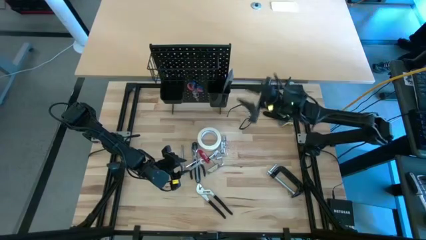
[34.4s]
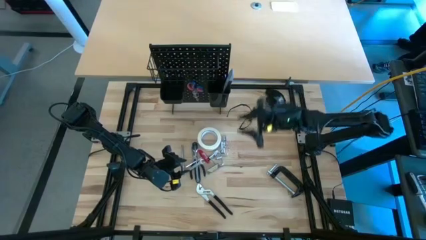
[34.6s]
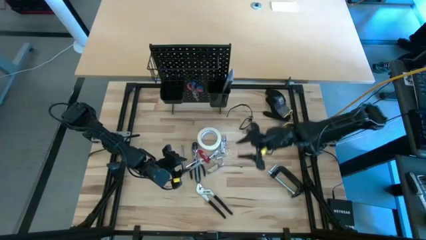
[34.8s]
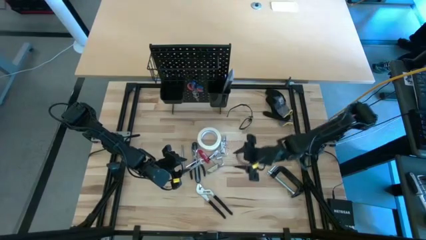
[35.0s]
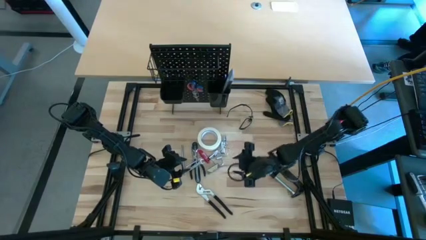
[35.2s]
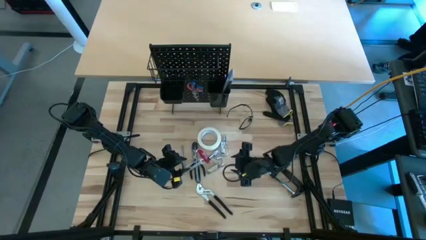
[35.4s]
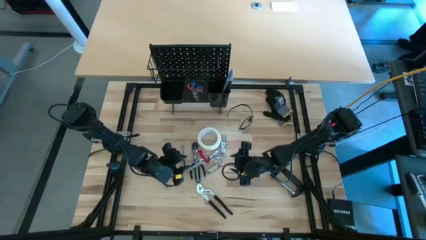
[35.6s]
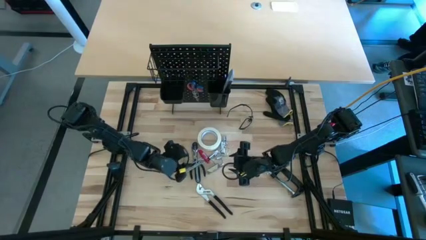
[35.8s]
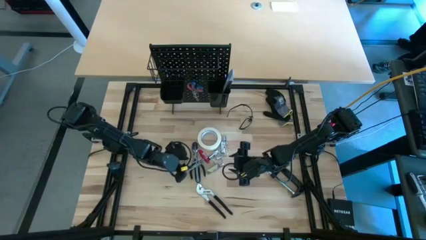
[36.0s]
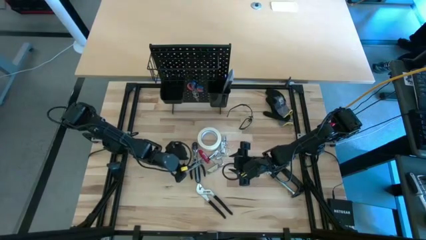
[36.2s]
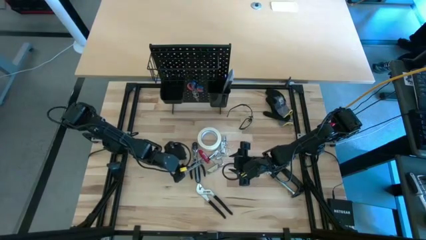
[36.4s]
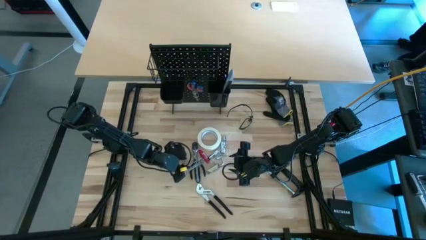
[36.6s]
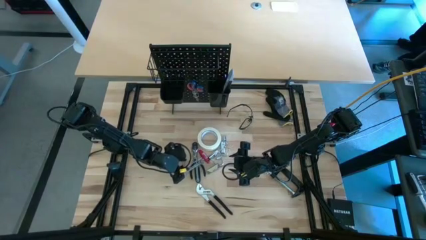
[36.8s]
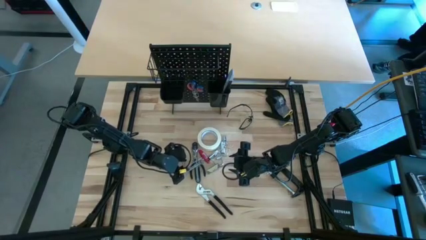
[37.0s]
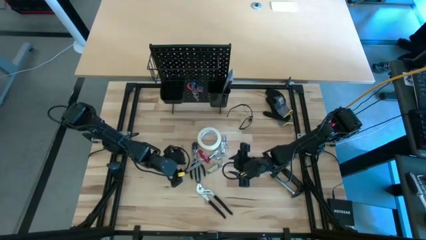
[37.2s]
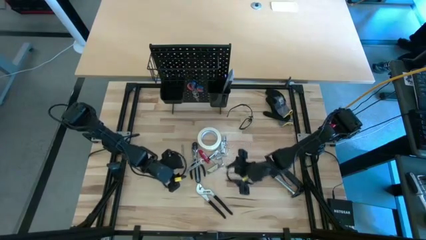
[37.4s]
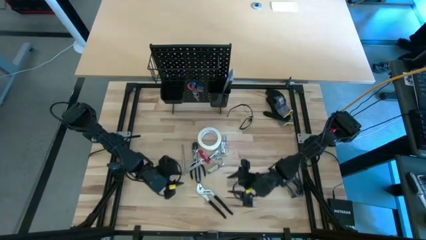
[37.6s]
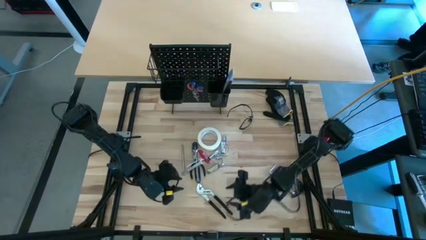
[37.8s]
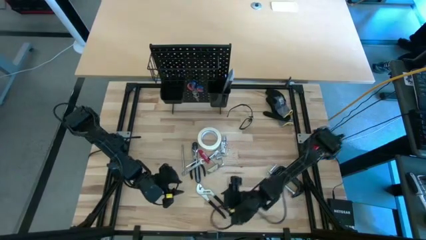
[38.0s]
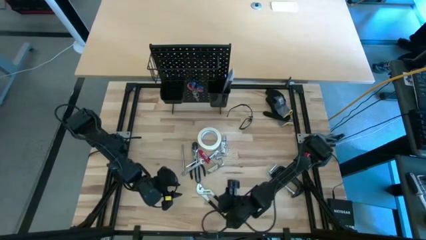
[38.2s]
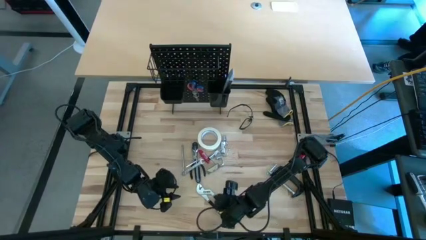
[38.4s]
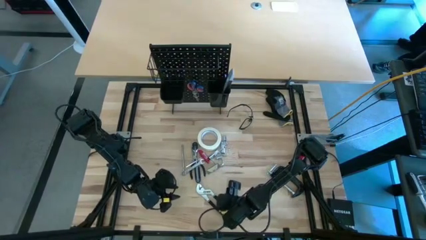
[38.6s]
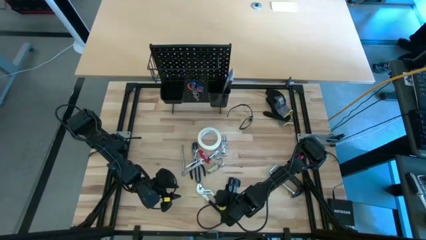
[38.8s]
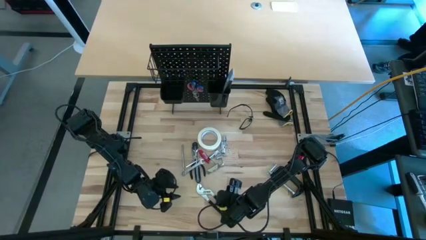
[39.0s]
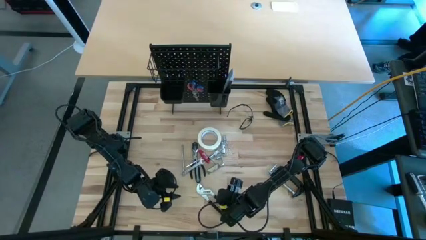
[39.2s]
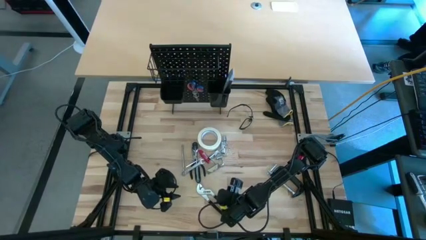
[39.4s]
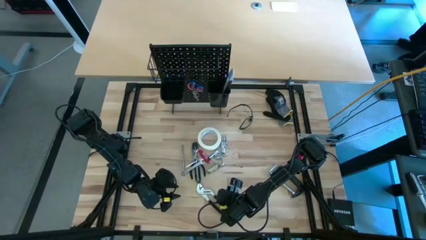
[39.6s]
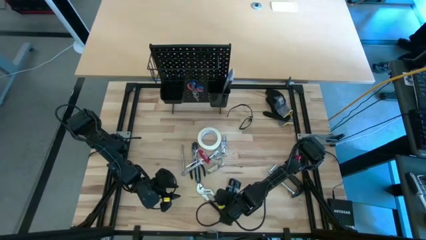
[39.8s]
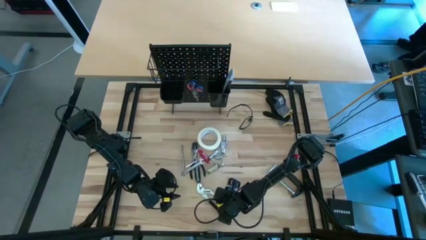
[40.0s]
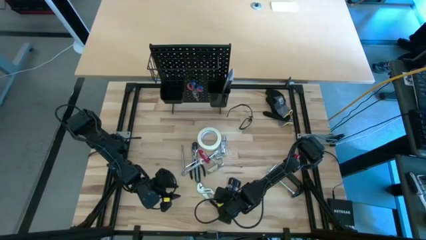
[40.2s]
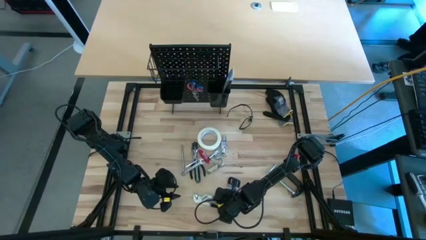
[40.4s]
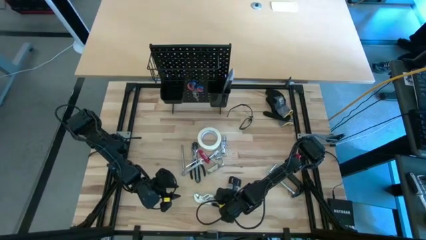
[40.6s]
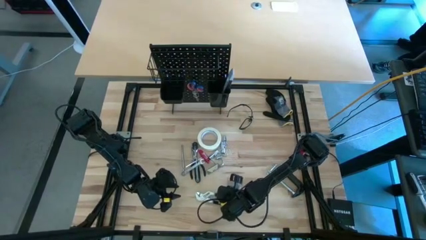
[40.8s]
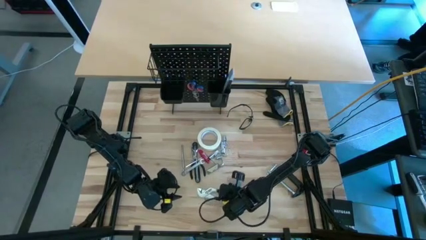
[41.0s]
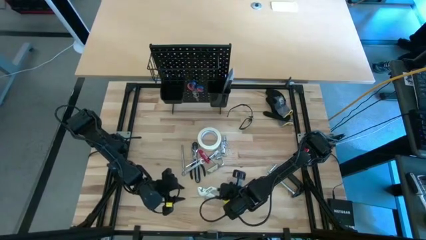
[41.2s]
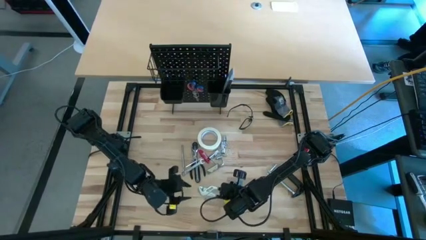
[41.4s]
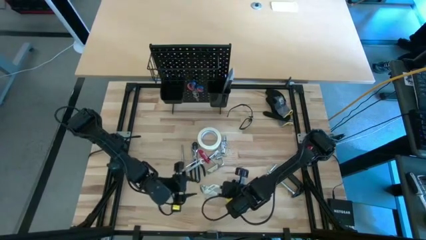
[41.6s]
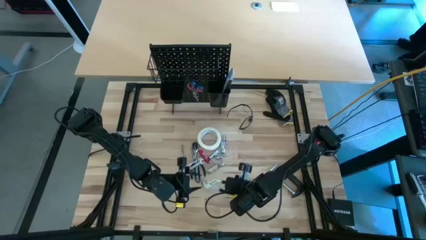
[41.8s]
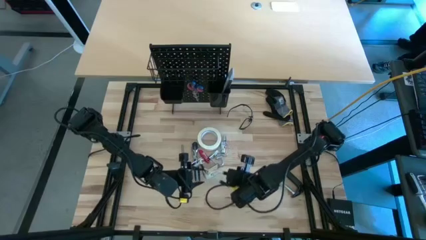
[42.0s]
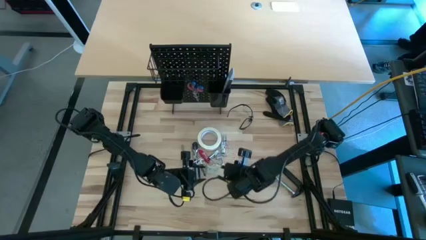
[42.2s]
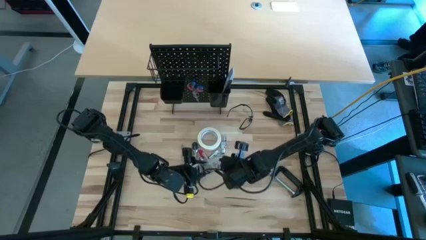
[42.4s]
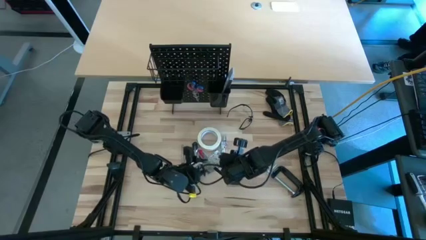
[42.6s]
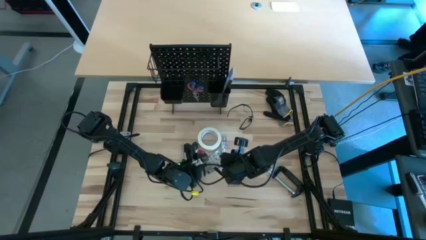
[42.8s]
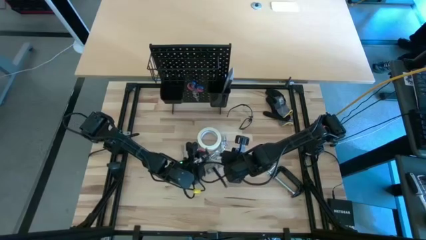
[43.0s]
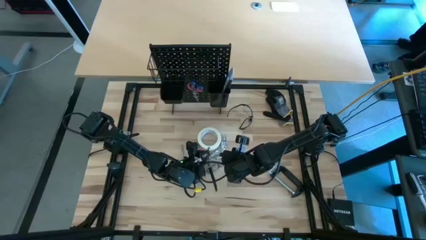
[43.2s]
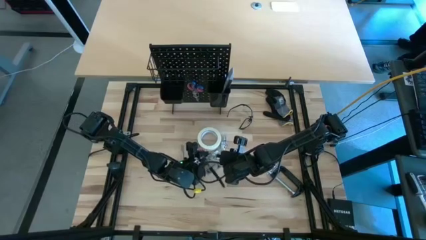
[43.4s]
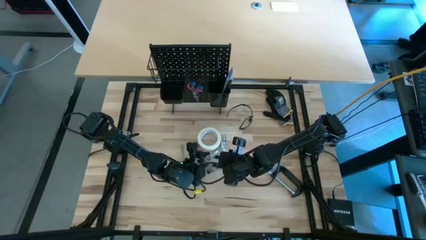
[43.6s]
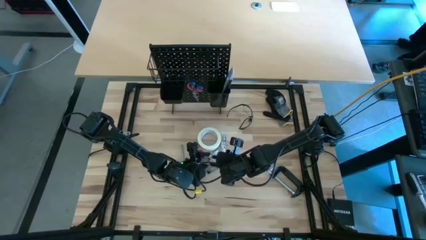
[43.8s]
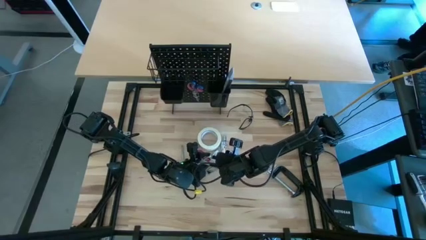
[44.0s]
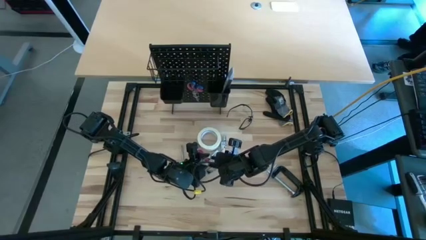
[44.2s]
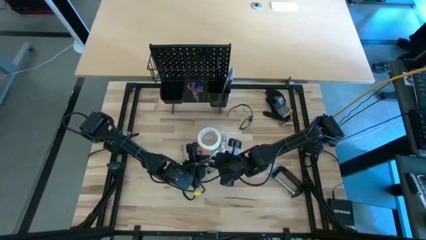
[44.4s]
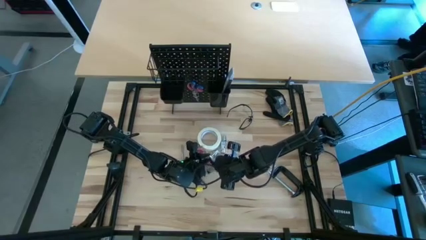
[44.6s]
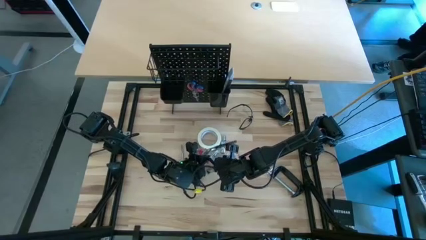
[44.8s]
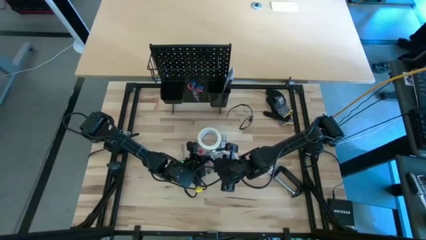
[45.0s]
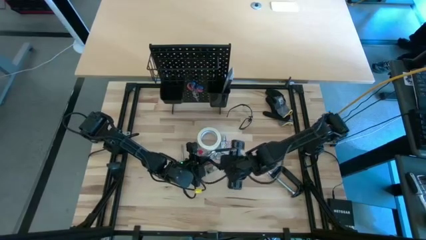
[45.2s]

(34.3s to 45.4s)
Task: Hang tools onto peg board
Put the black slip-joint pliers into the right black bin on the peg board

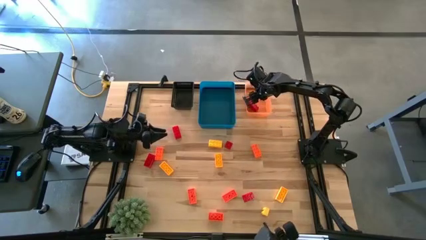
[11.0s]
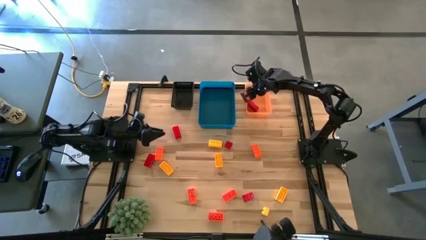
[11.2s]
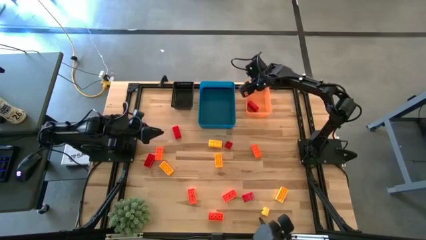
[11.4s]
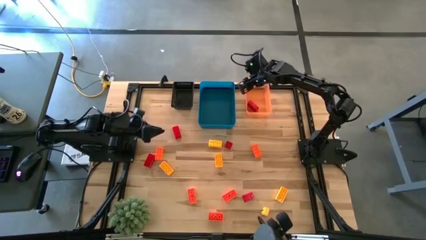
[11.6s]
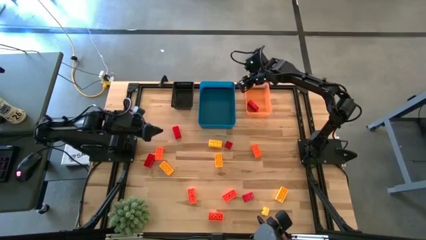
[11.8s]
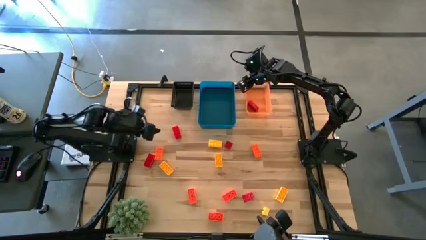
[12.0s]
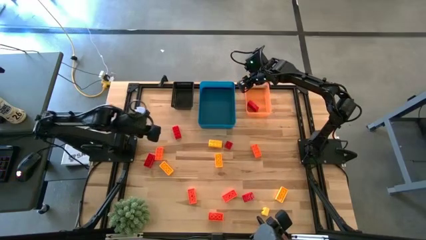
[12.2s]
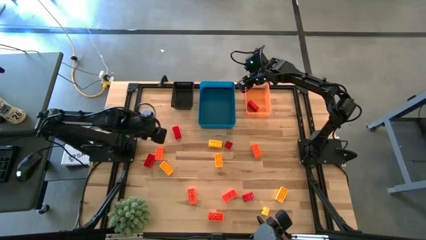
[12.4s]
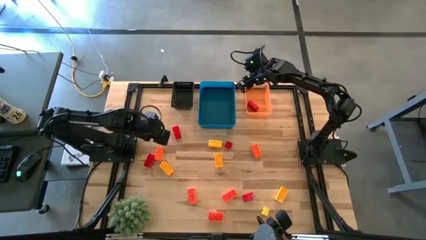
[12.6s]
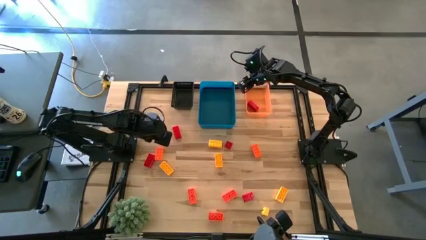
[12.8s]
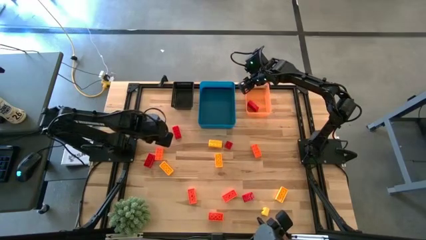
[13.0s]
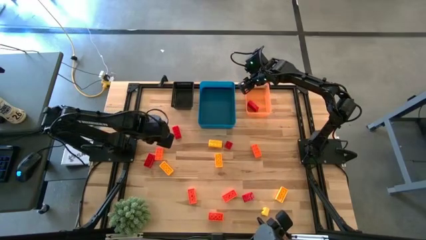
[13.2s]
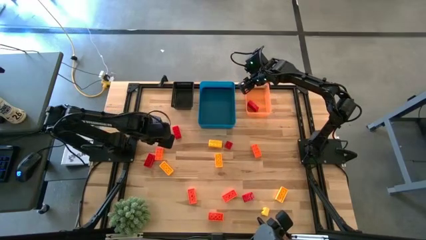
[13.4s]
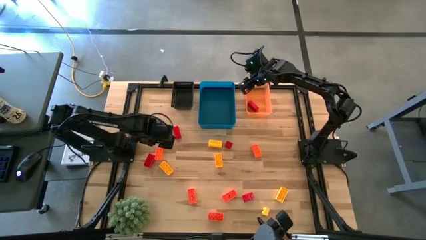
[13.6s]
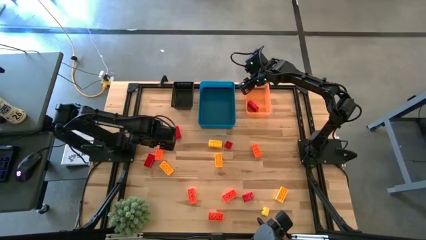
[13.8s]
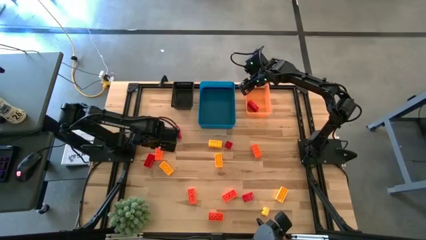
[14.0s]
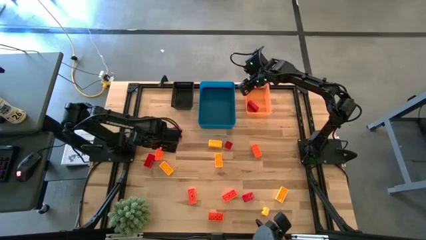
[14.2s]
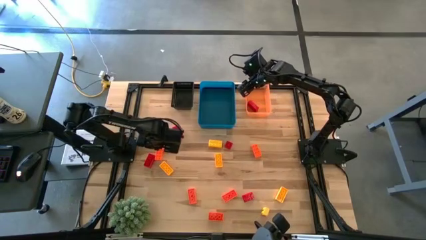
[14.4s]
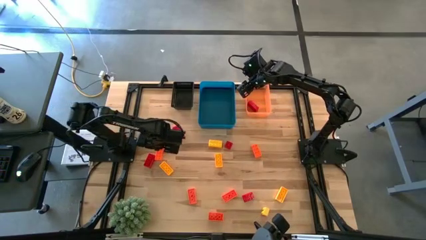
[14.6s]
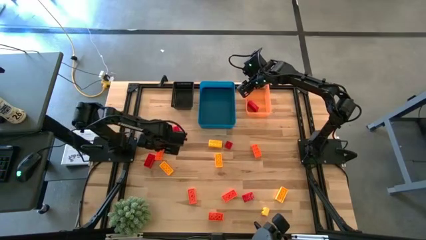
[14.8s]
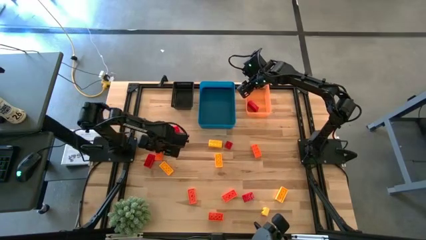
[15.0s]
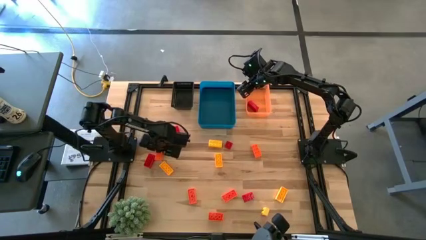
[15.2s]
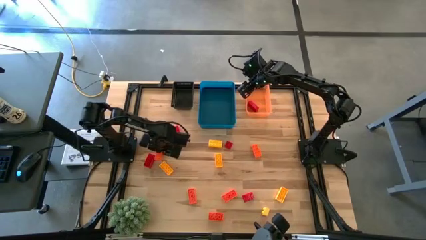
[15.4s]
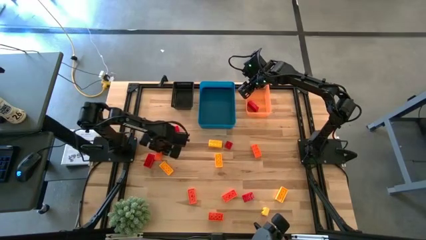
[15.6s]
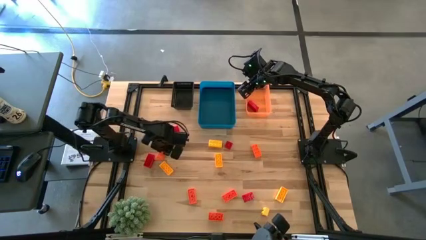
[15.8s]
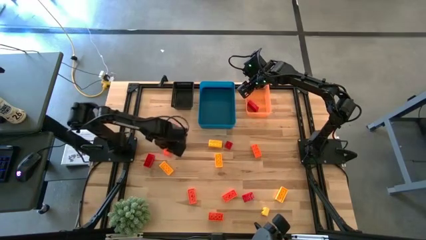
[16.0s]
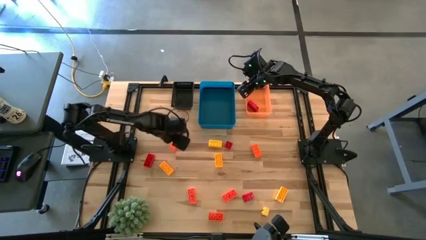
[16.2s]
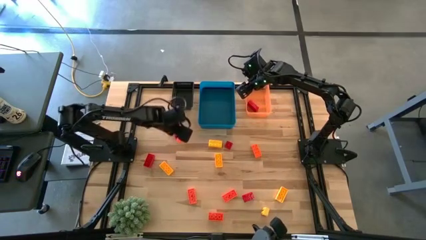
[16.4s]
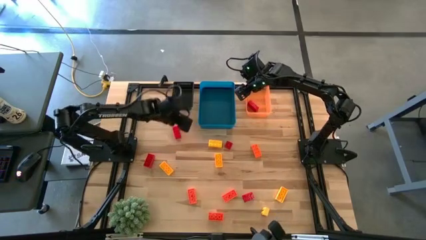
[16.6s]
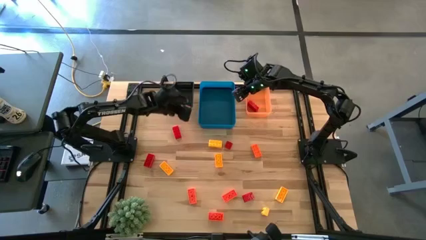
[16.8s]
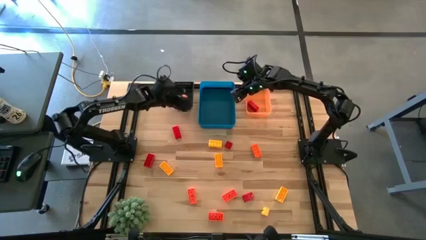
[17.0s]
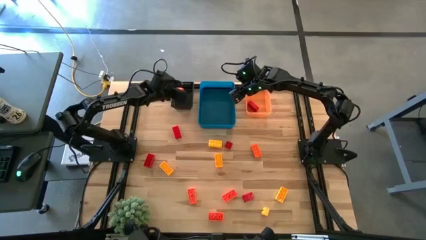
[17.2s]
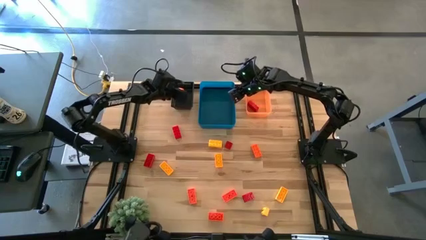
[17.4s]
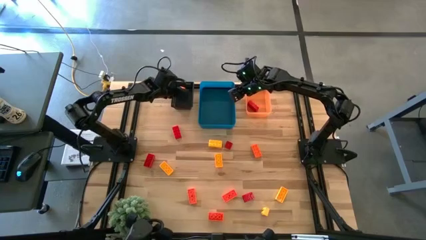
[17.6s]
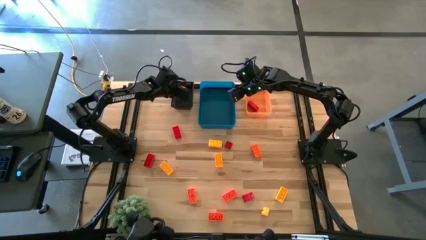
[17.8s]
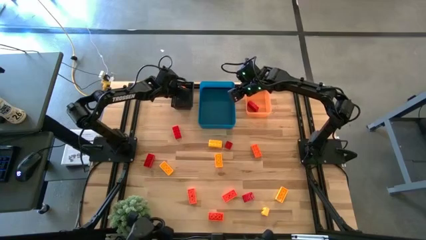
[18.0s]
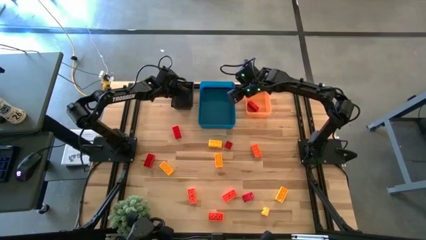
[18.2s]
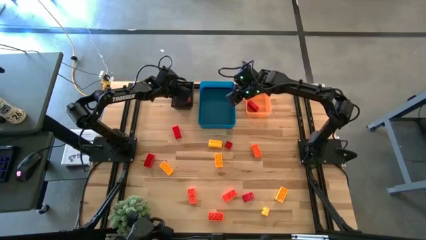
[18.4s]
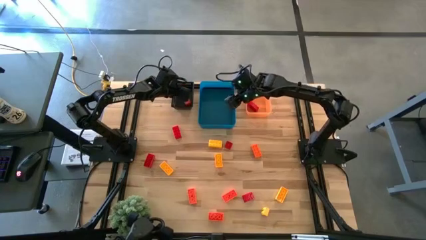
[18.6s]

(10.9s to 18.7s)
Task: Sort & place blocks by color
Put the orange game piece into the black bin
